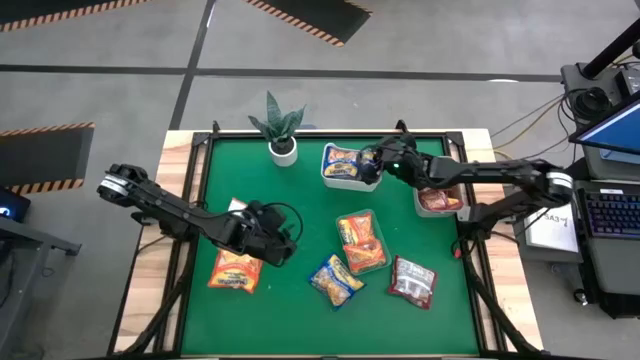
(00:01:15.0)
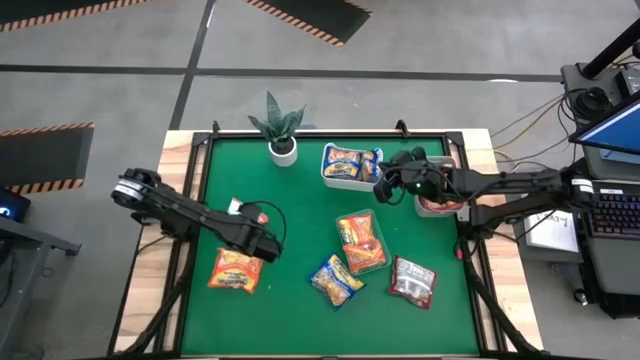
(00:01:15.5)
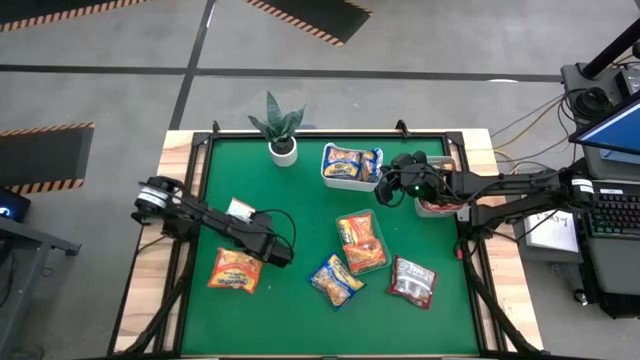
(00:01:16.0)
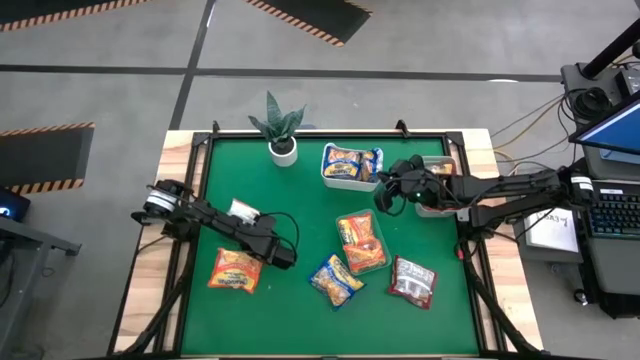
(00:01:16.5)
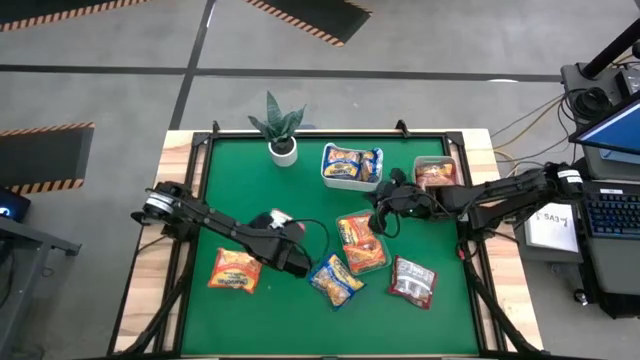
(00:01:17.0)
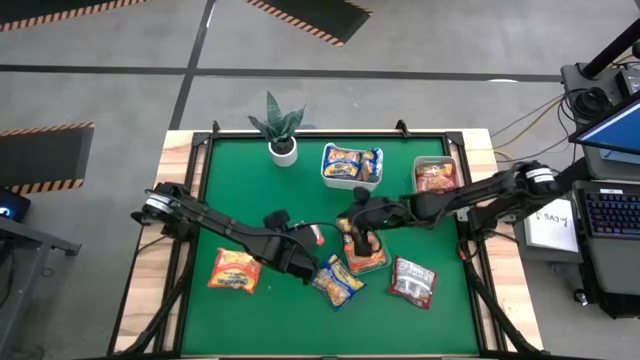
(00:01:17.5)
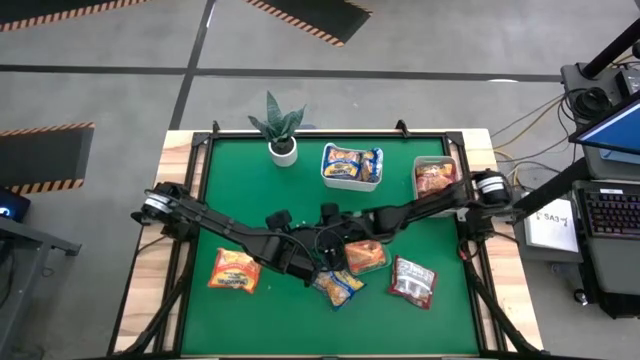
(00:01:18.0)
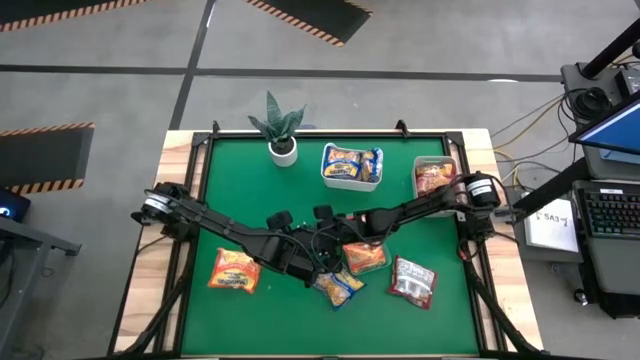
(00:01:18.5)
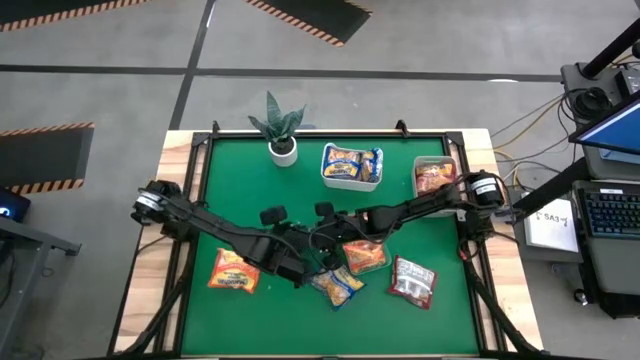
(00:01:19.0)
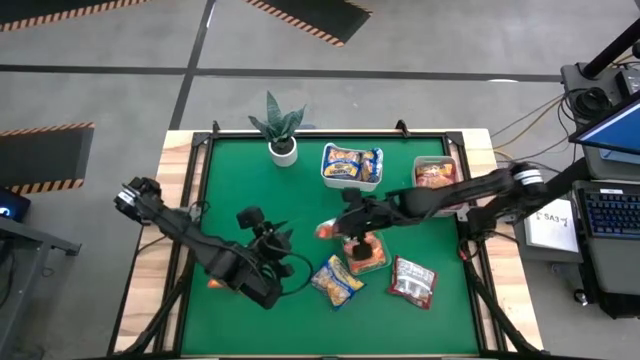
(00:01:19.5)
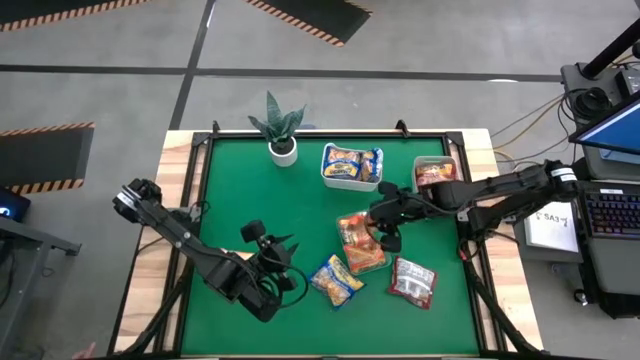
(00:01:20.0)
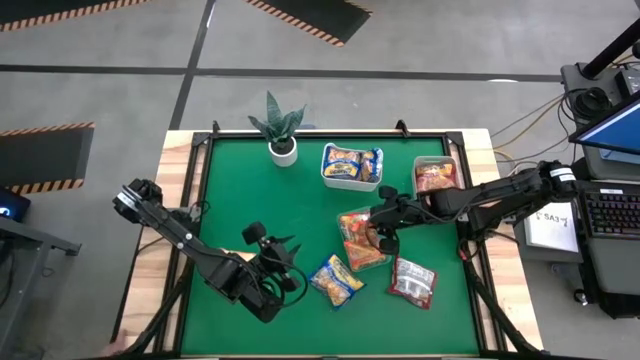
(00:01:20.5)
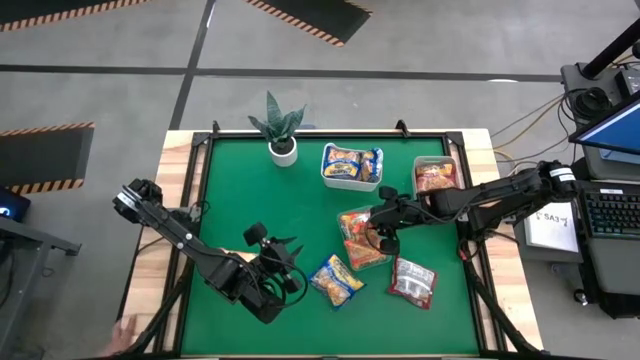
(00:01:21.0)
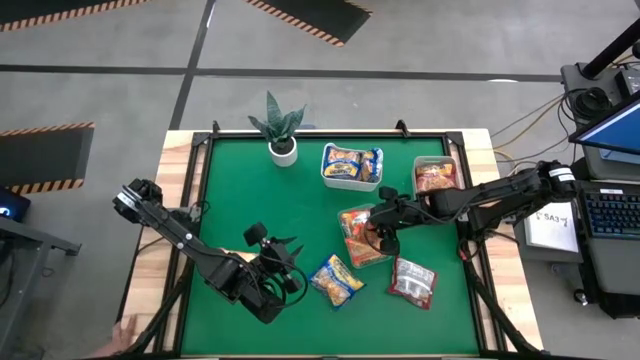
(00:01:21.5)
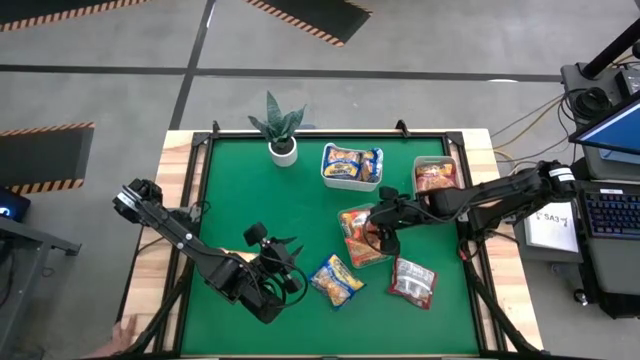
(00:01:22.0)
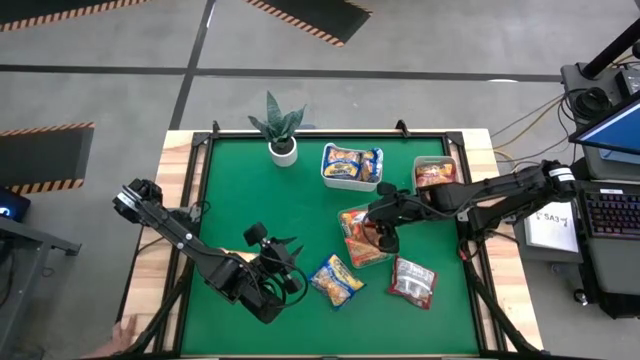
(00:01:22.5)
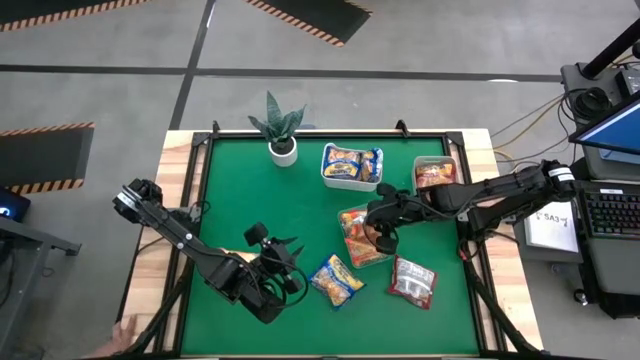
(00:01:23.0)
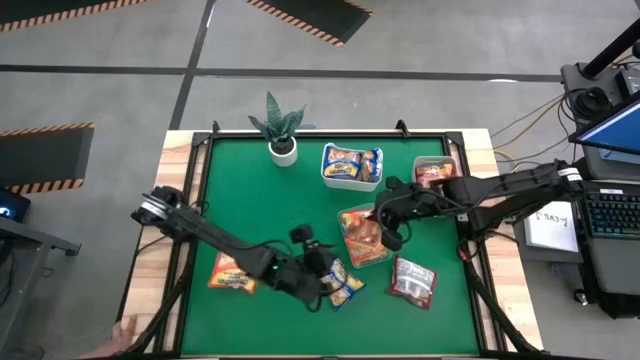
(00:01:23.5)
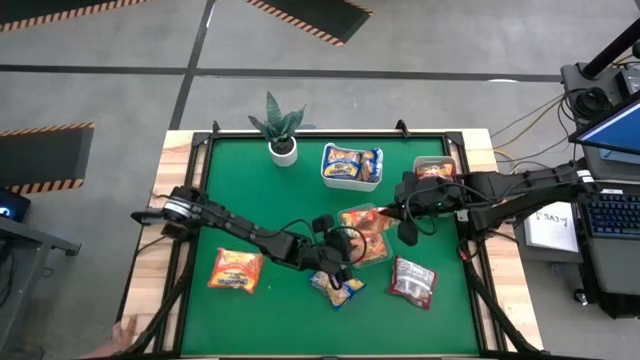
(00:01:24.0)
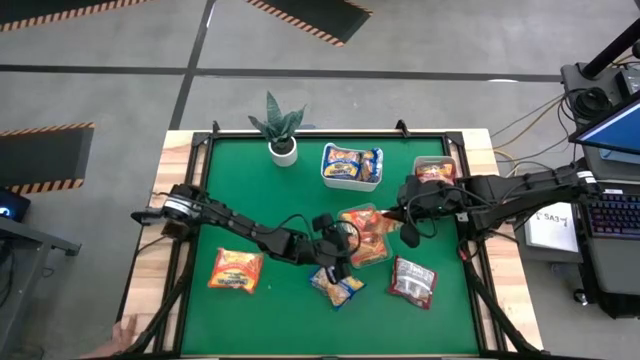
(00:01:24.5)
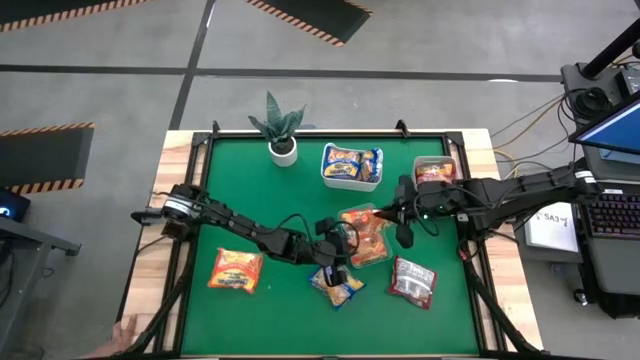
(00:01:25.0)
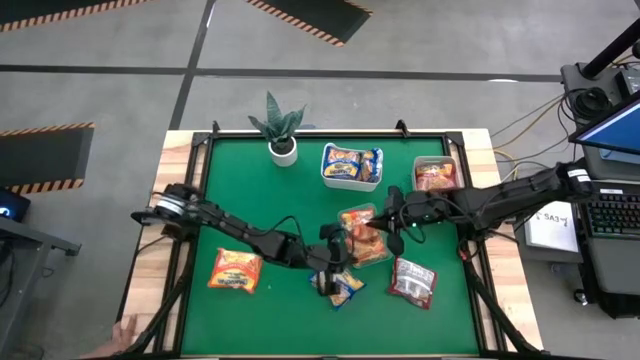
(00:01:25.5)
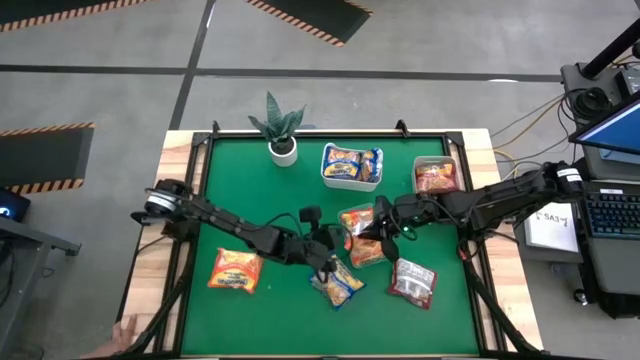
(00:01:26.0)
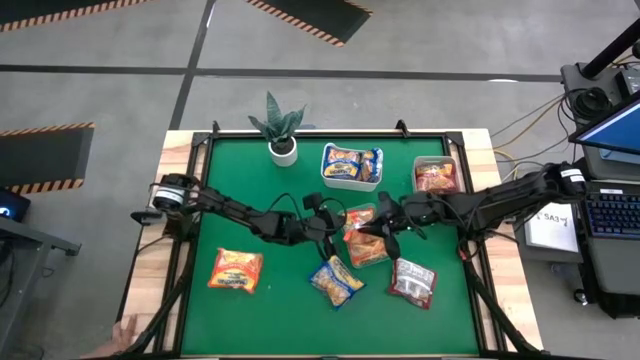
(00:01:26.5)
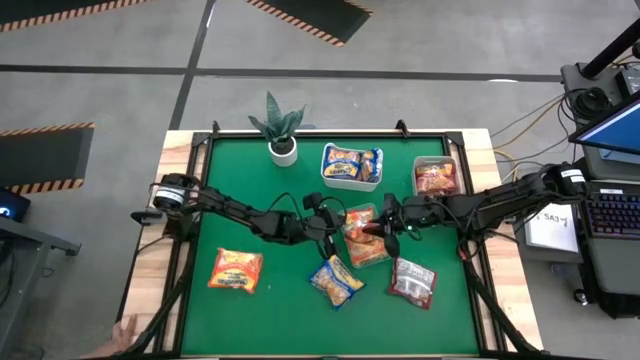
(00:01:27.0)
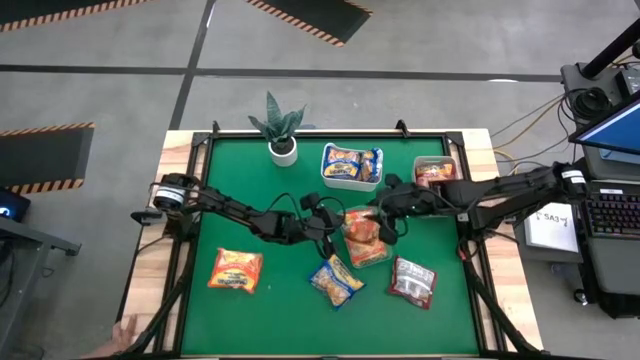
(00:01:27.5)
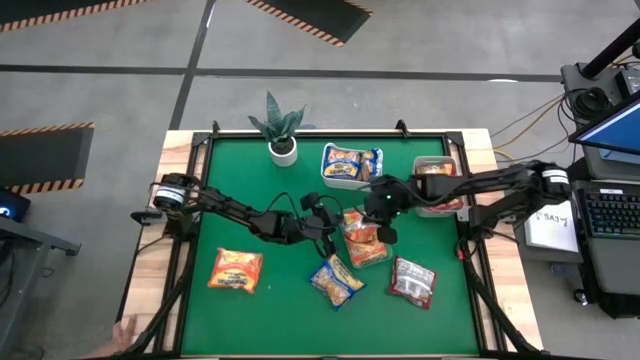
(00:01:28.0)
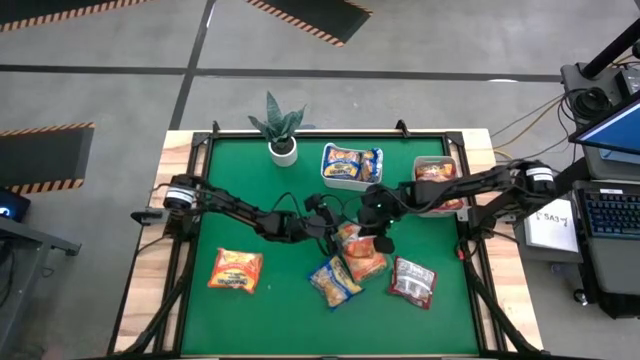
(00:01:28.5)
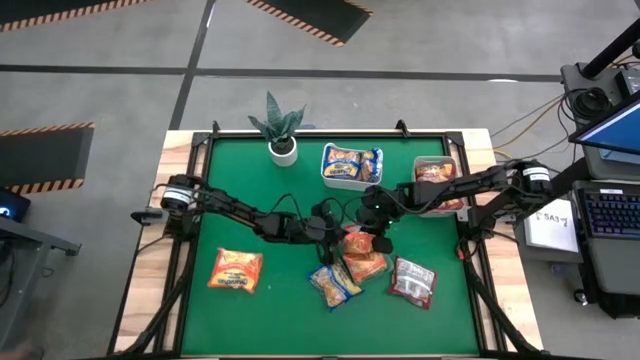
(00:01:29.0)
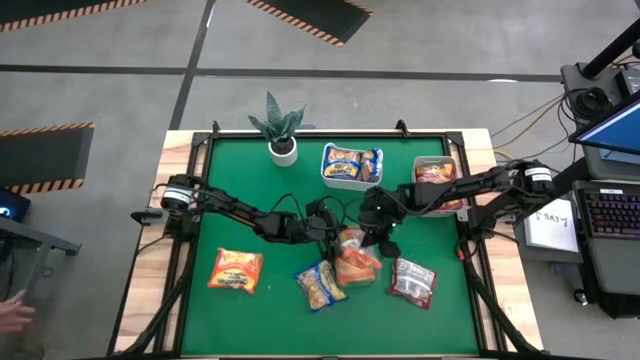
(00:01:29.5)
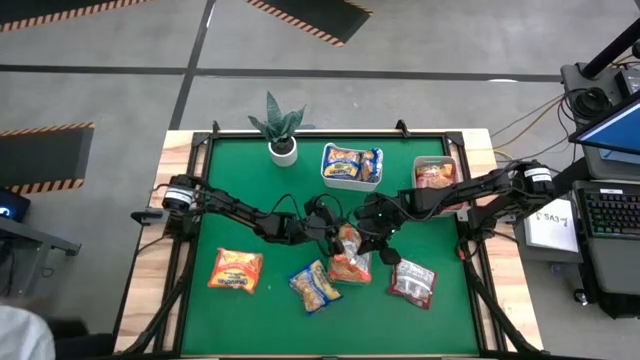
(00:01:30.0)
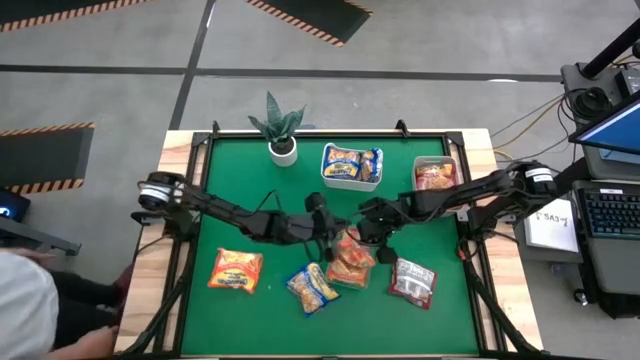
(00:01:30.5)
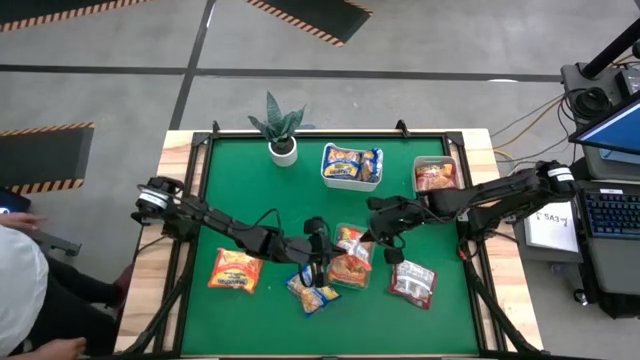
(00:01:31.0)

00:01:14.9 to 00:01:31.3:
Task: Sort Maruchan noodles
Put the orange noodle pack into the green bin
